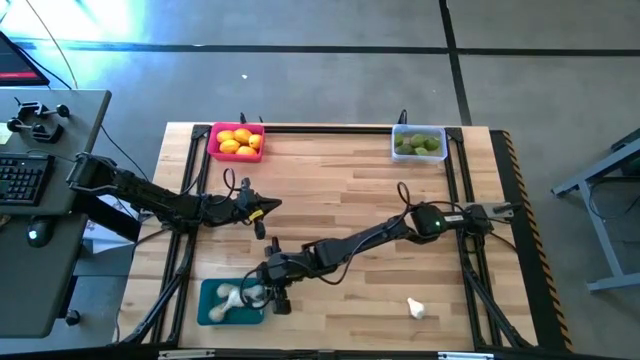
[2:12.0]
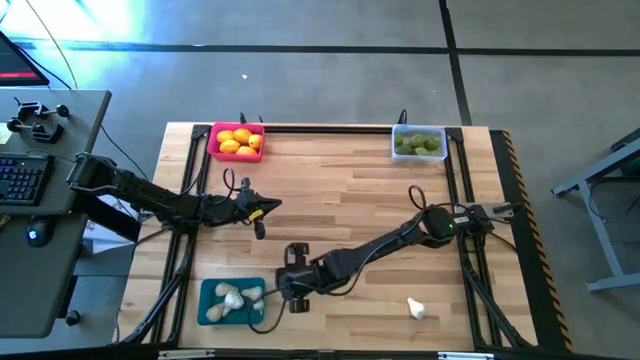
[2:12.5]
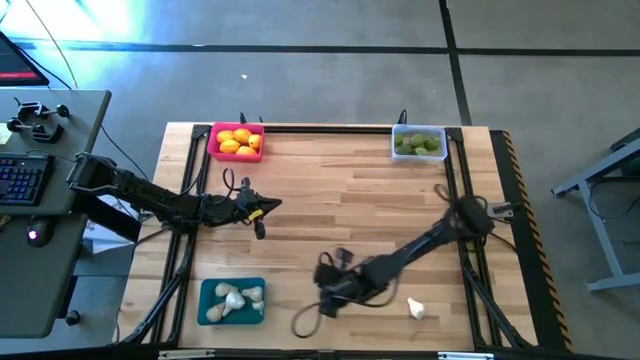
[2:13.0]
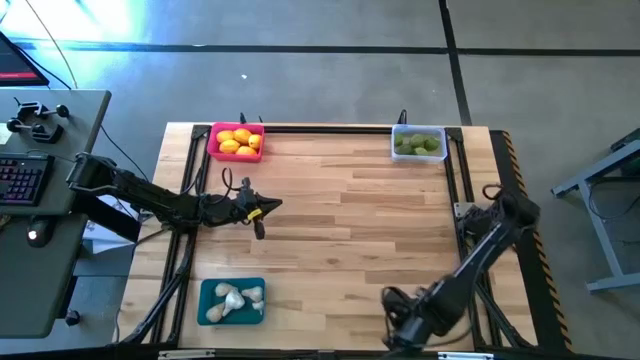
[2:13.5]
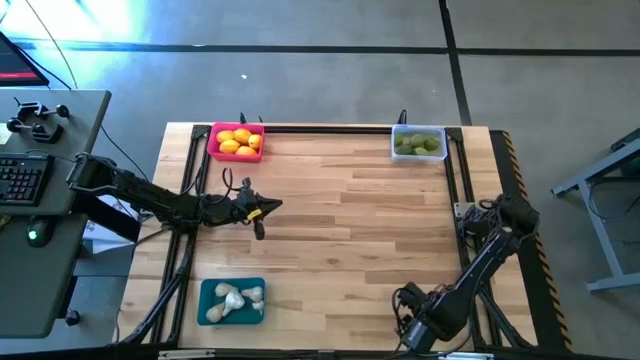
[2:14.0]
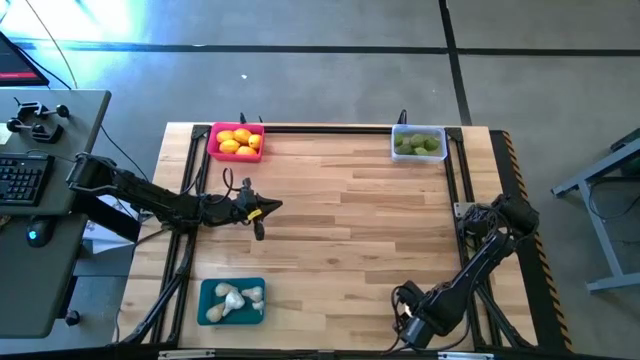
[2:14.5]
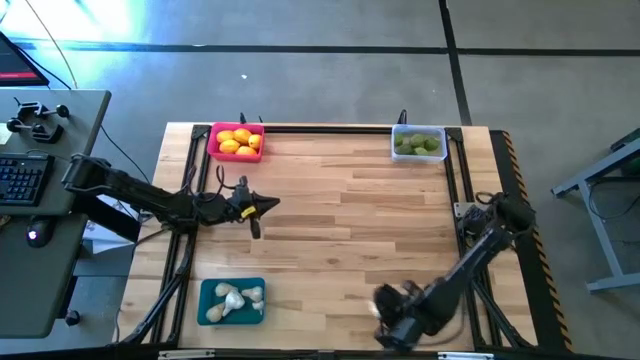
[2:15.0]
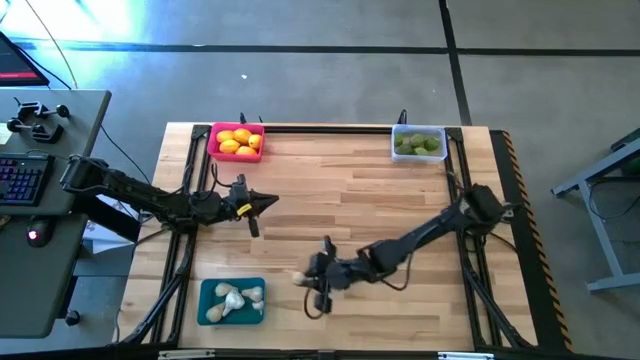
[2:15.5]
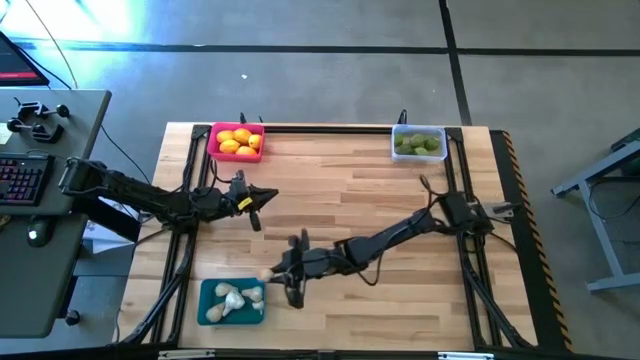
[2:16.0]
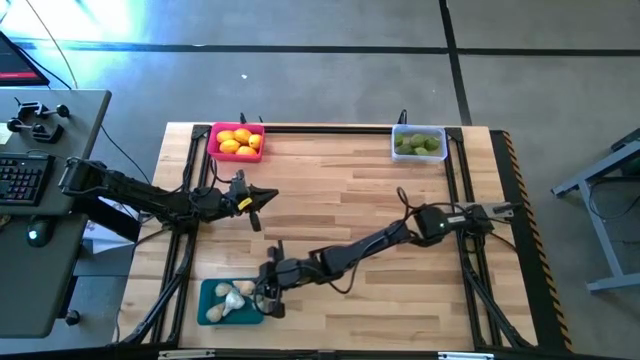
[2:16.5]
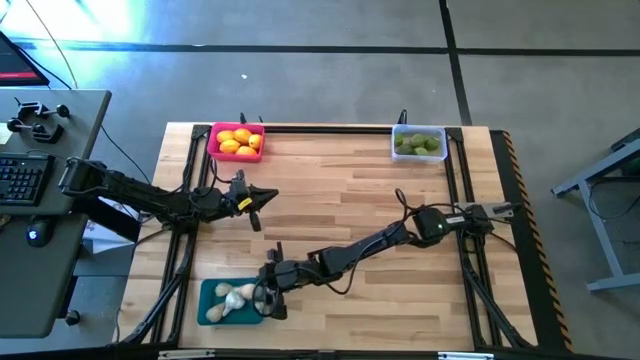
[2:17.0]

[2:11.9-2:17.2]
Task: Sort produce into baskets
Put the garlic into the blue bin

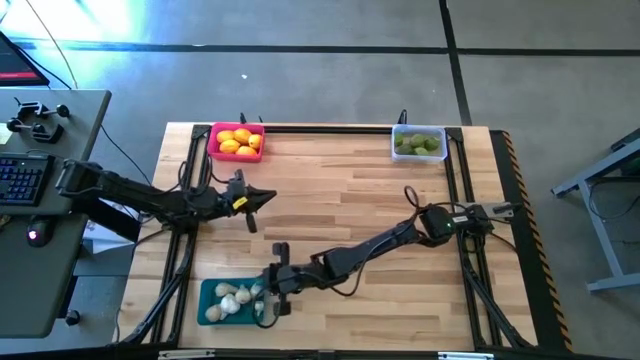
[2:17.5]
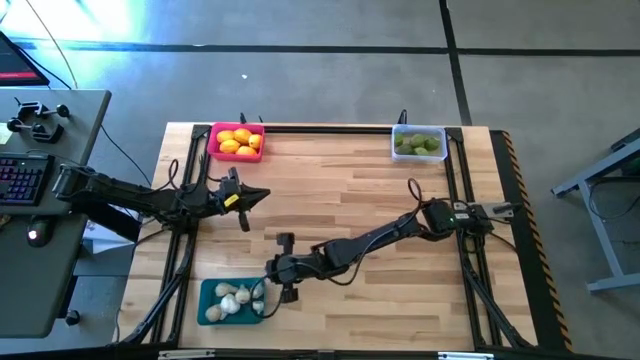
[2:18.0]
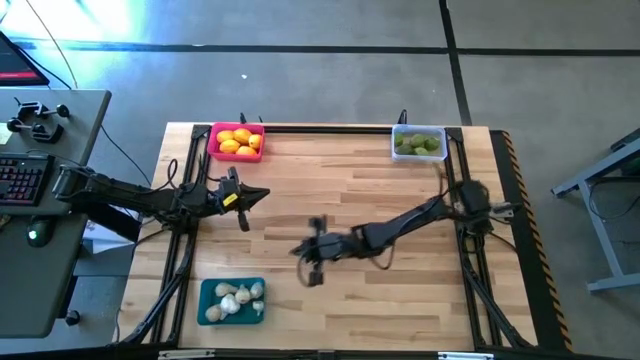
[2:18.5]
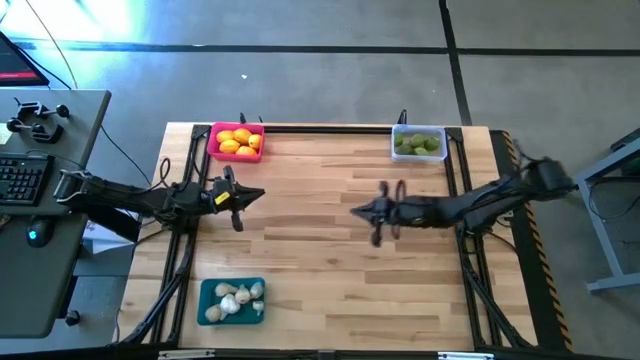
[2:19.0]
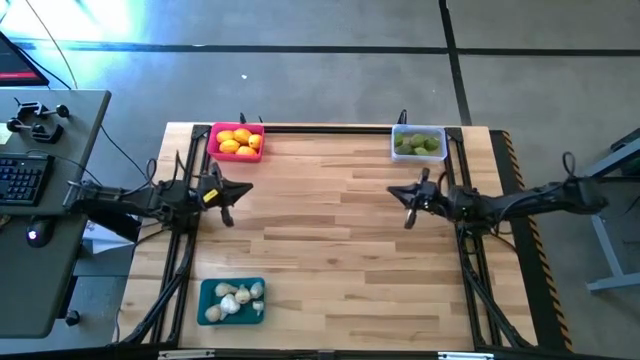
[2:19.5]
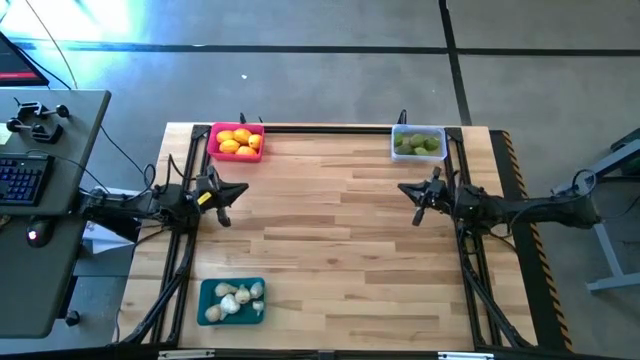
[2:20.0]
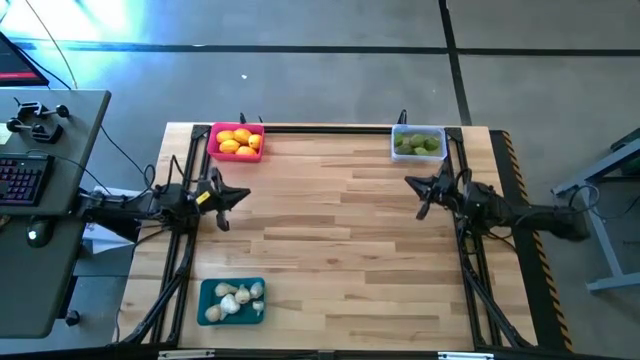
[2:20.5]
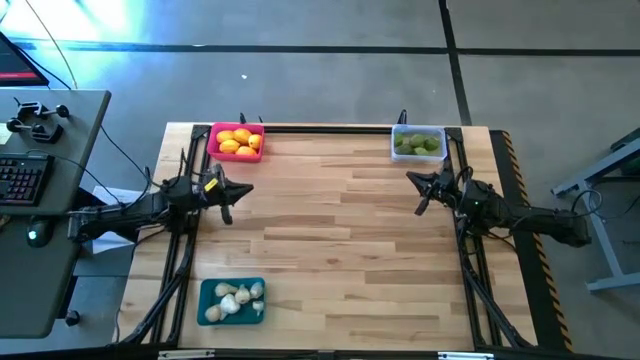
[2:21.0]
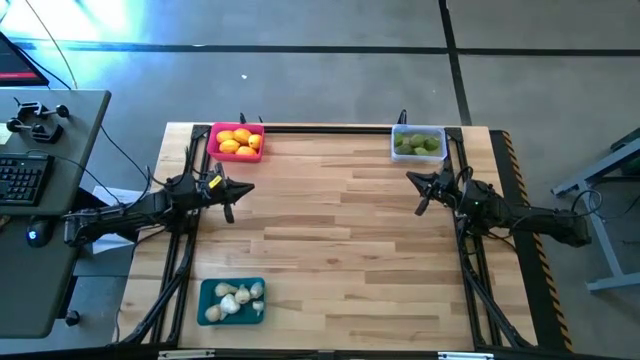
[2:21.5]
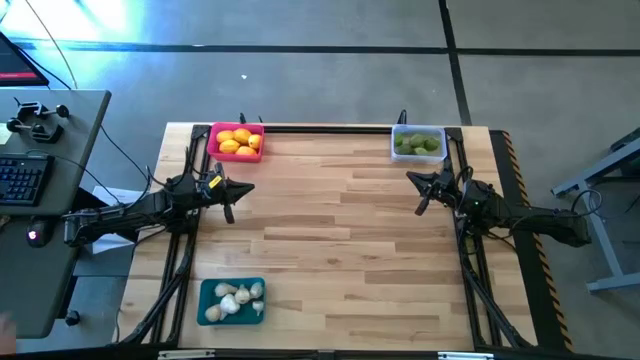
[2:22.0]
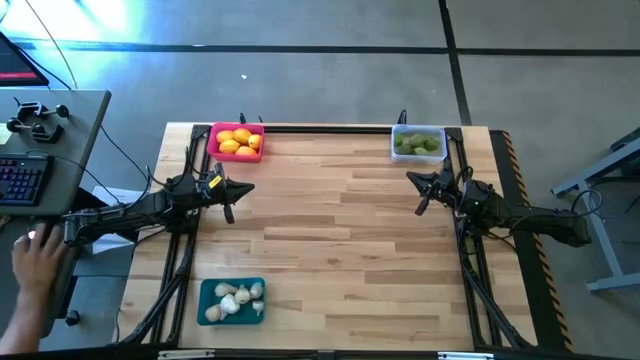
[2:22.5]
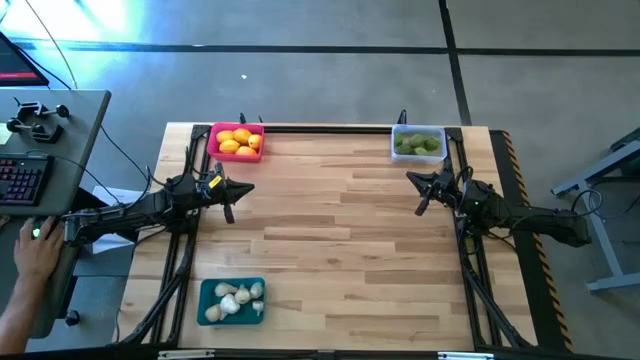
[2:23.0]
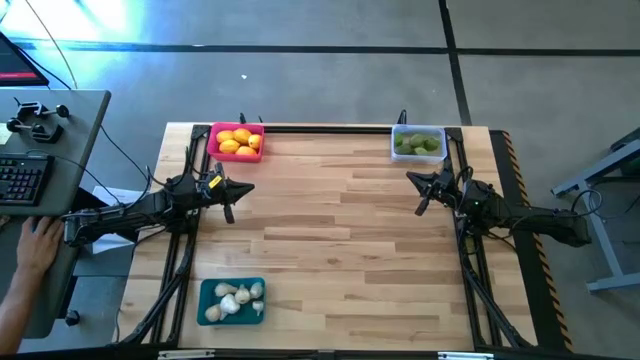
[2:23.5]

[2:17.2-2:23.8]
Return to Home Position

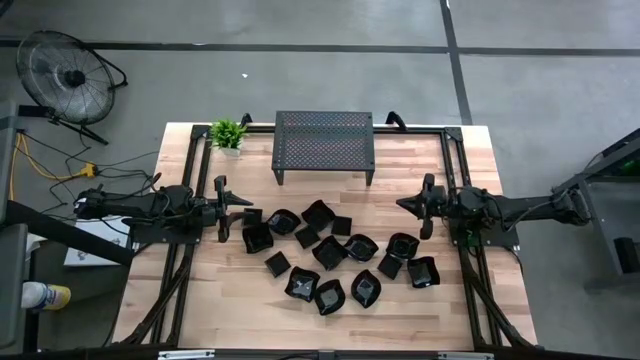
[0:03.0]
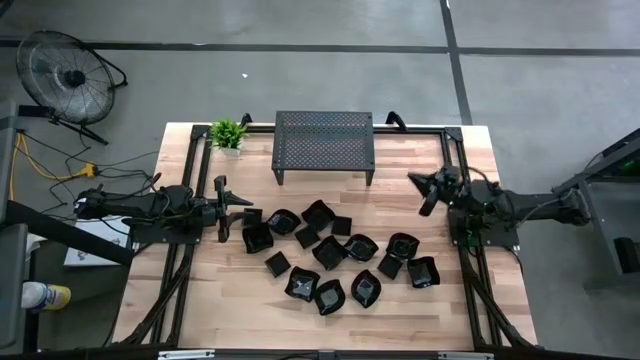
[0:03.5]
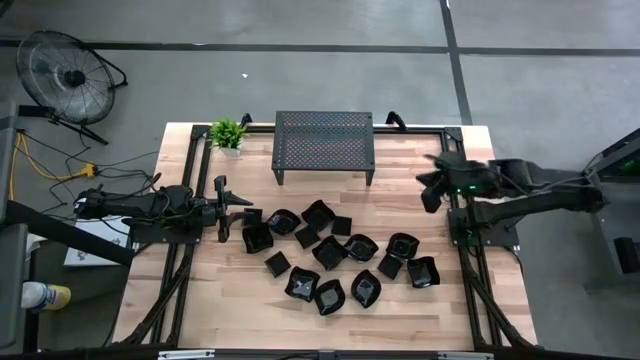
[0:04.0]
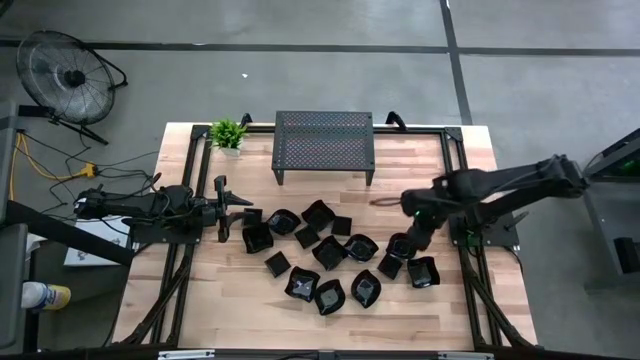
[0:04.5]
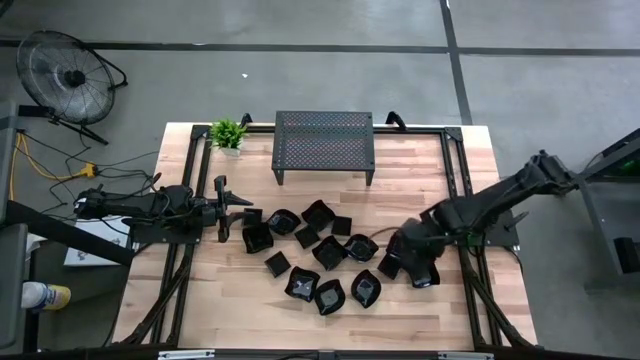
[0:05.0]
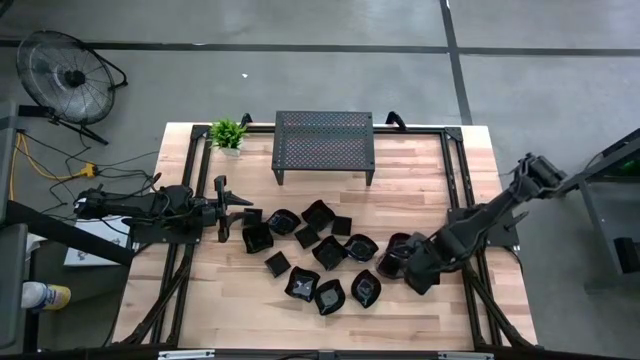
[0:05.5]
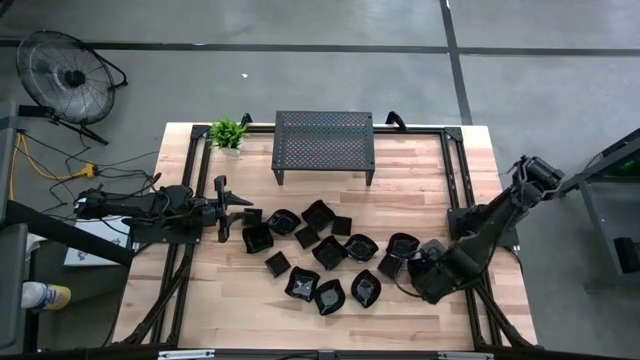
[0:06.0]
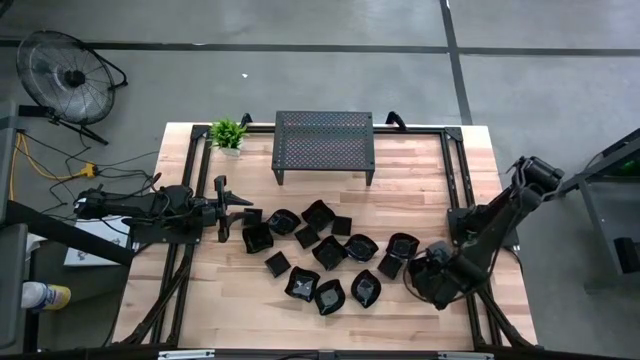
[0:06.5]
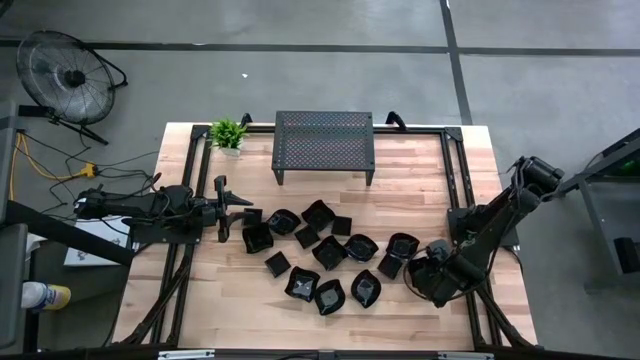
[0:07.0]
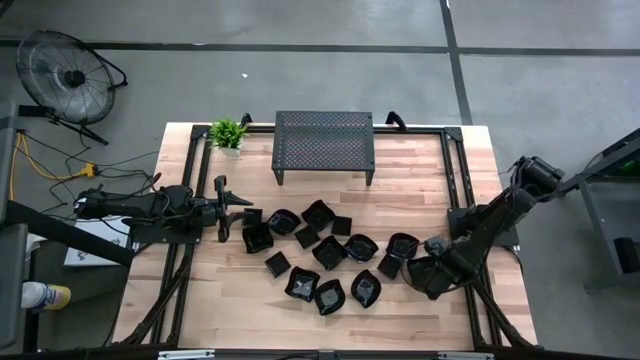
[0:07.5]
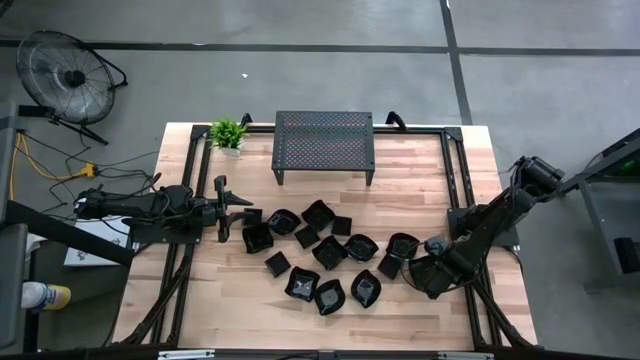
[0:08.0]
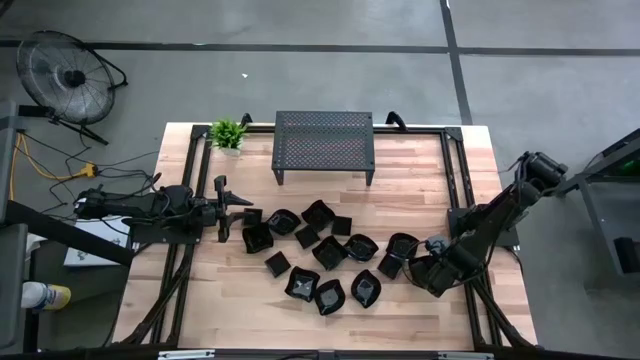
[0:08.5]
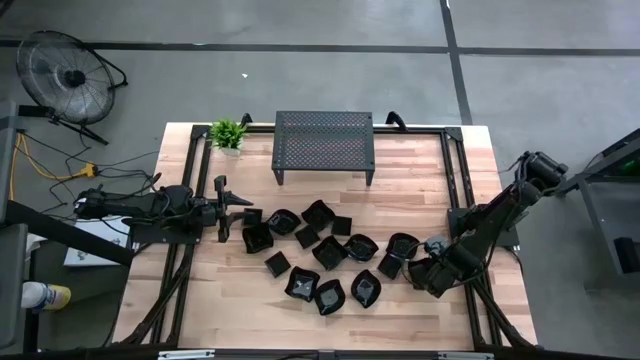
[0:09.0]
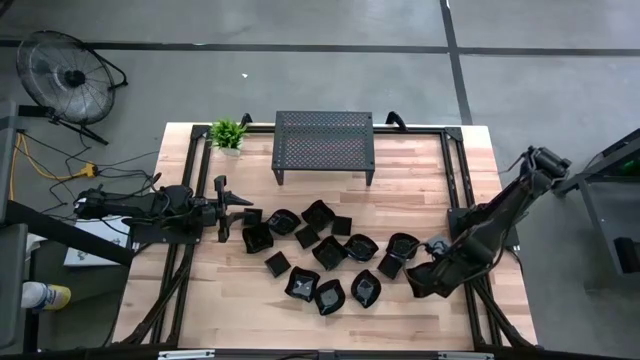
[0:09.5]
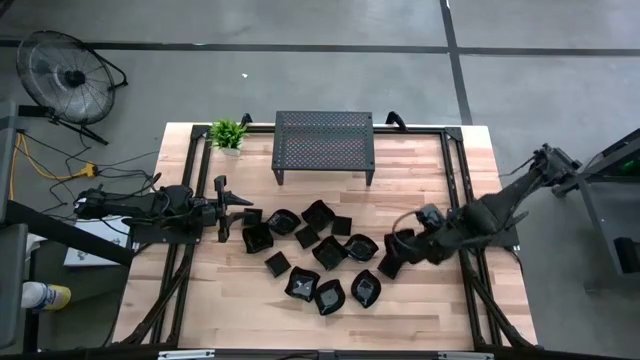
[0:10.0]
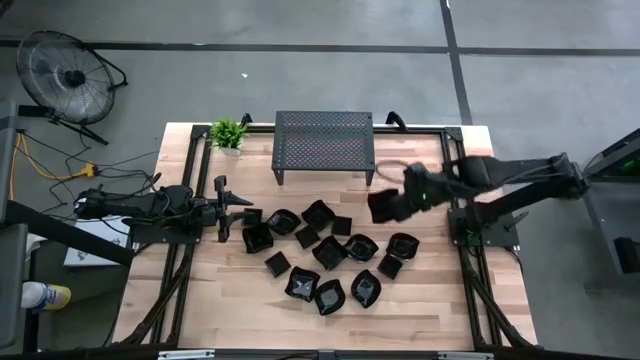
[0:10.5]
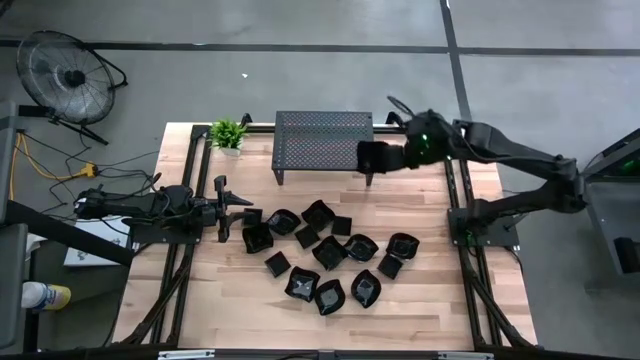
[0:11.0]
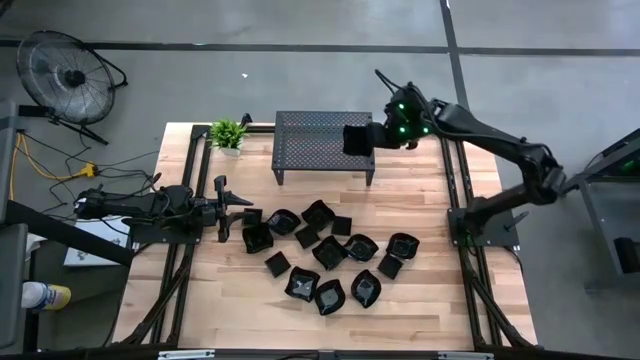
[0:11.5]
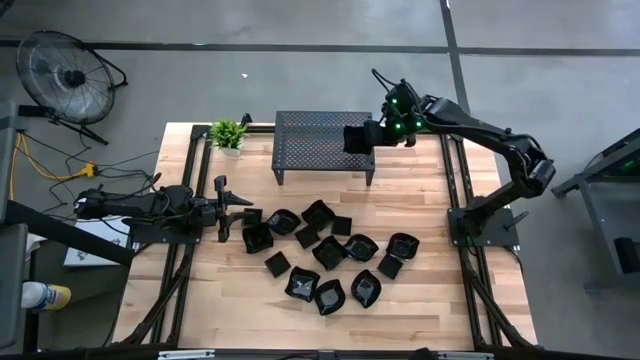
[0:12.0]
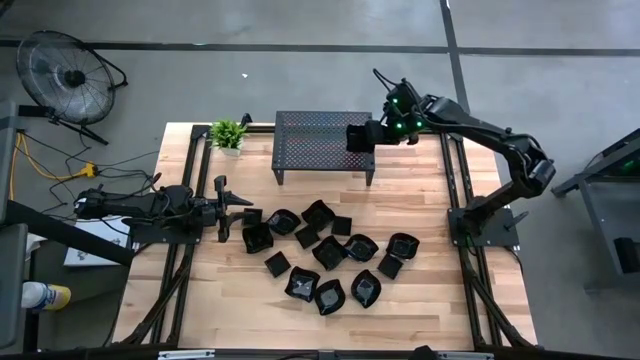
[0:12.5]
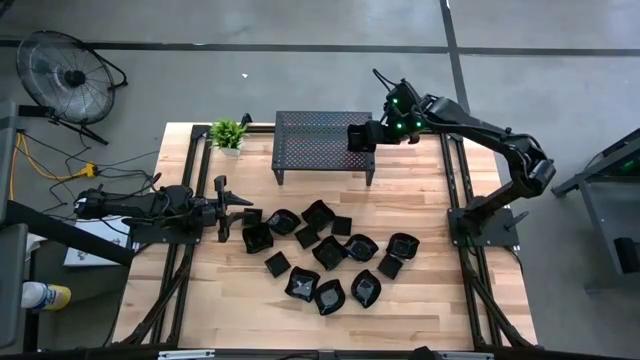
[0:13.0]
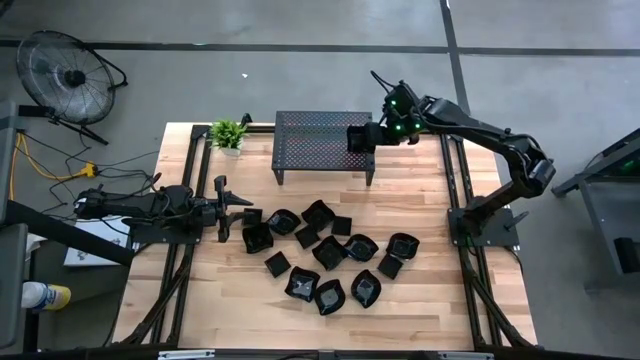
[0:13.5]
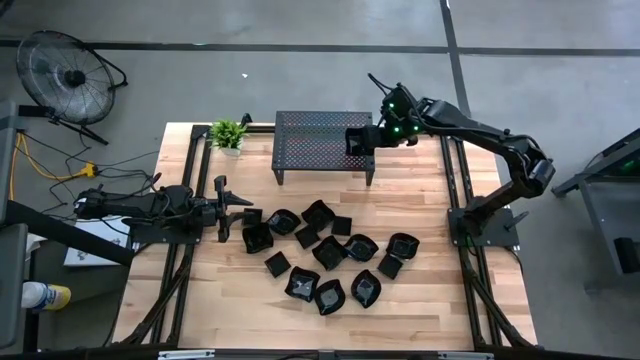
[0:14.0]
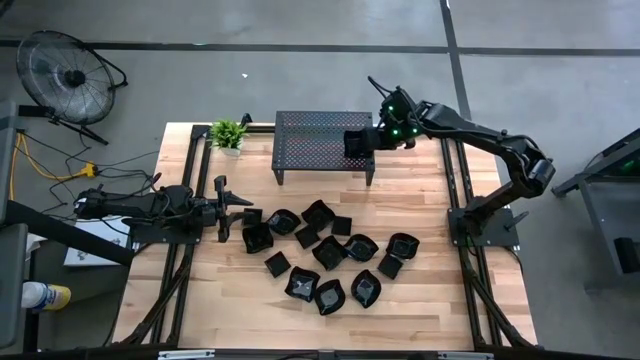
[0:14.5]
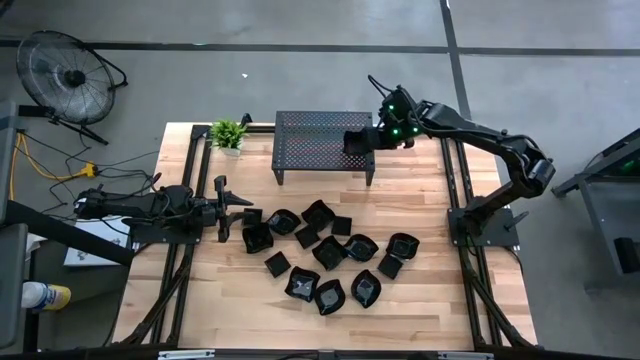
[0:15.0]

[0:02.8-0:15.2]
Task: Pick & Place Mini shaped plates
Put the distorted square plate on the shelf
